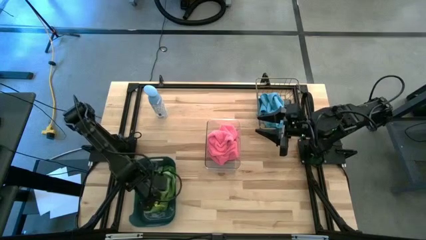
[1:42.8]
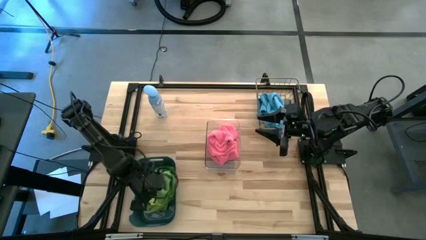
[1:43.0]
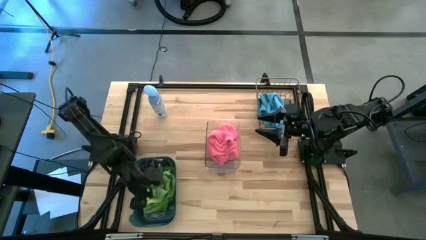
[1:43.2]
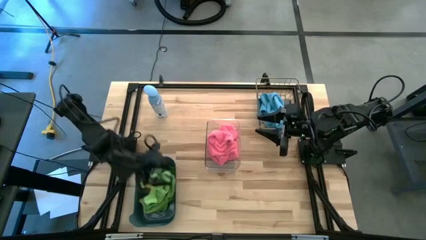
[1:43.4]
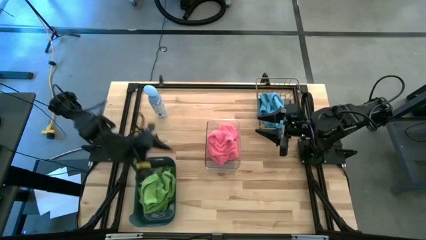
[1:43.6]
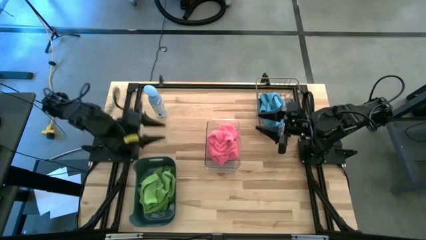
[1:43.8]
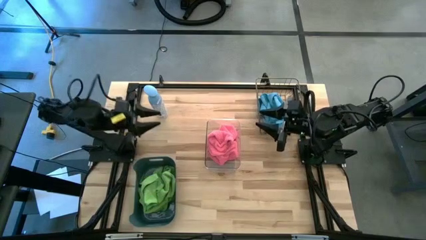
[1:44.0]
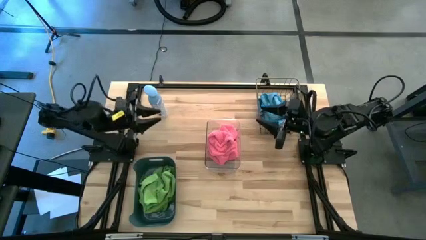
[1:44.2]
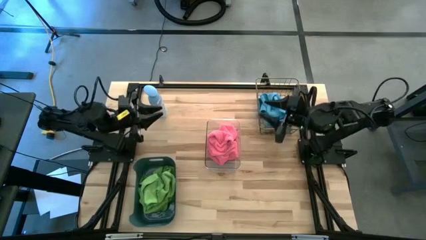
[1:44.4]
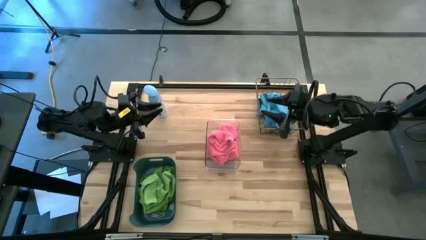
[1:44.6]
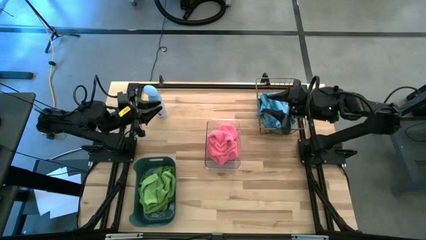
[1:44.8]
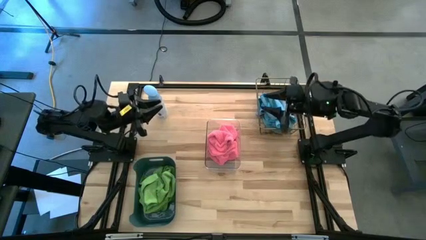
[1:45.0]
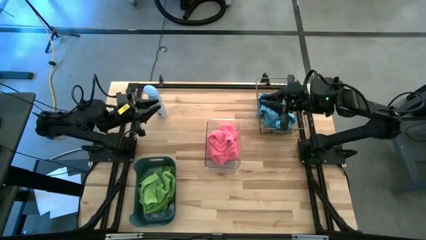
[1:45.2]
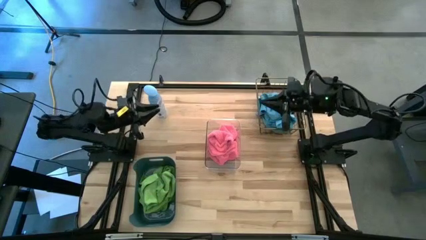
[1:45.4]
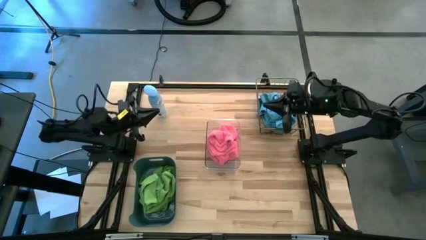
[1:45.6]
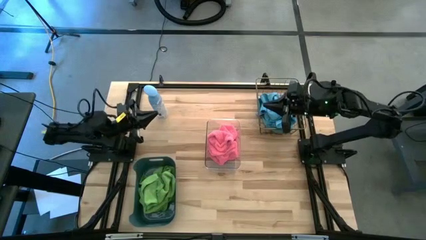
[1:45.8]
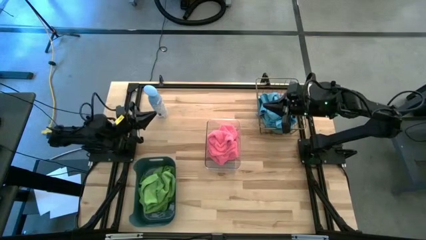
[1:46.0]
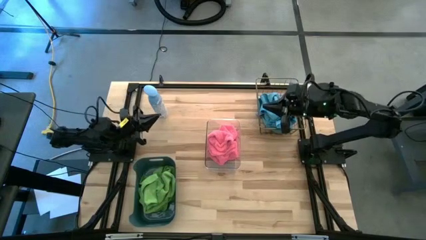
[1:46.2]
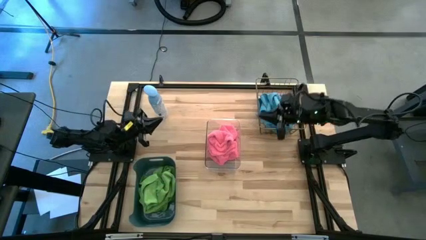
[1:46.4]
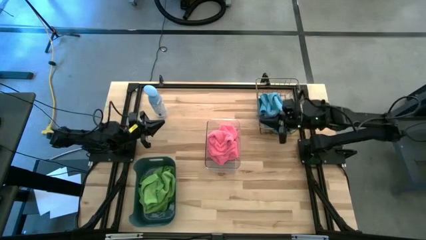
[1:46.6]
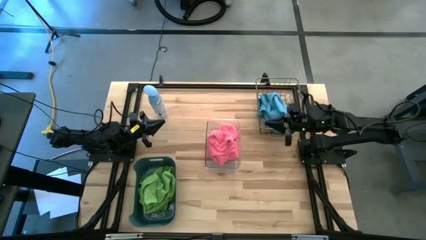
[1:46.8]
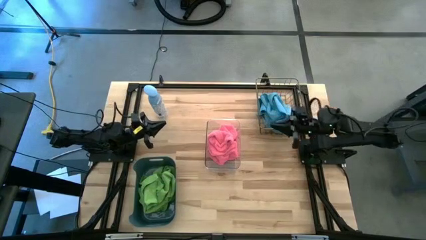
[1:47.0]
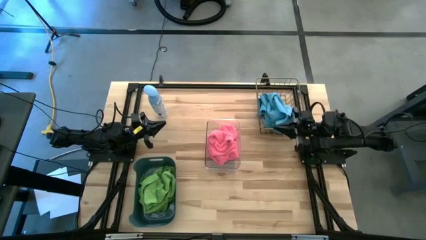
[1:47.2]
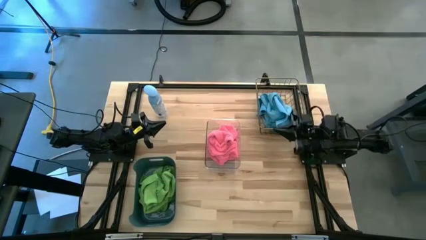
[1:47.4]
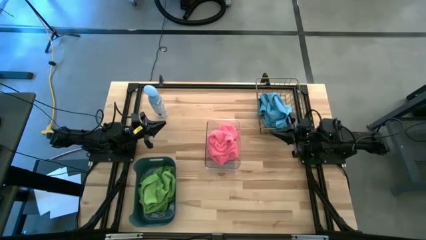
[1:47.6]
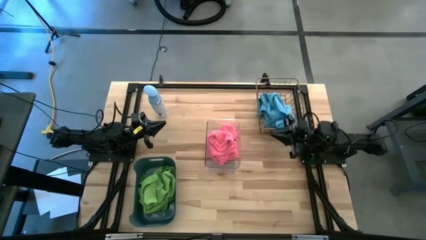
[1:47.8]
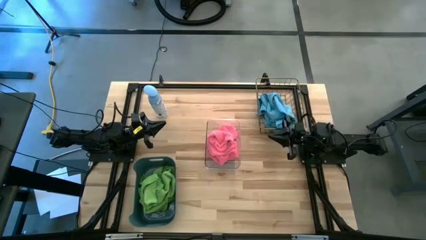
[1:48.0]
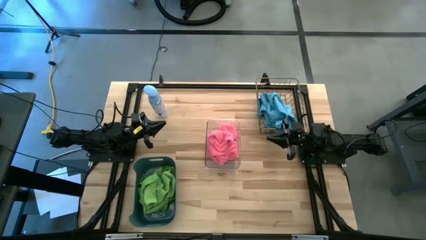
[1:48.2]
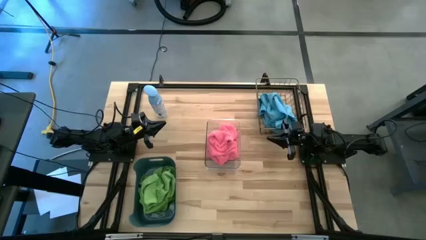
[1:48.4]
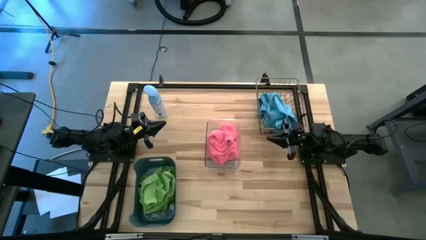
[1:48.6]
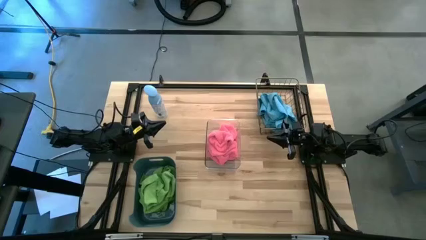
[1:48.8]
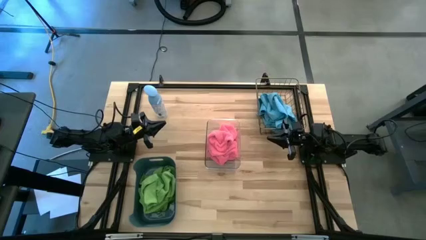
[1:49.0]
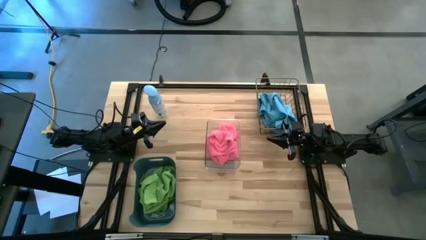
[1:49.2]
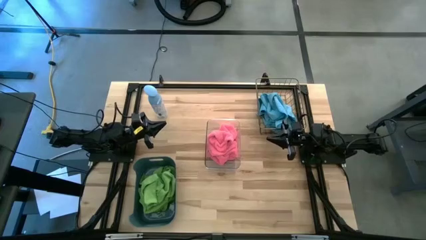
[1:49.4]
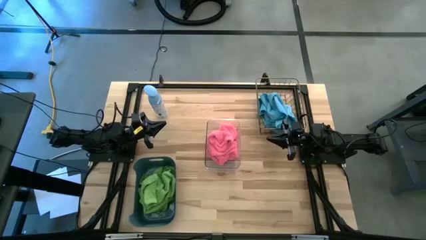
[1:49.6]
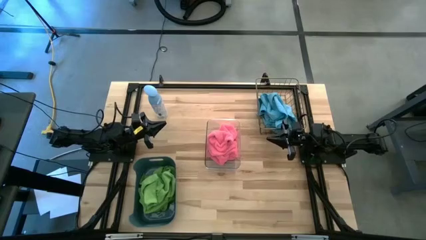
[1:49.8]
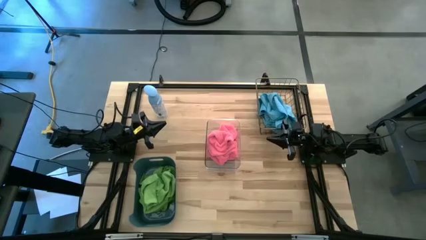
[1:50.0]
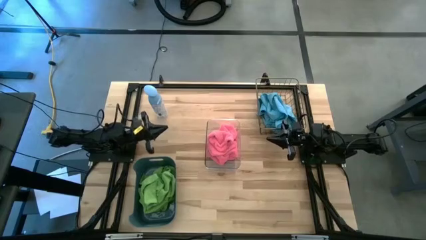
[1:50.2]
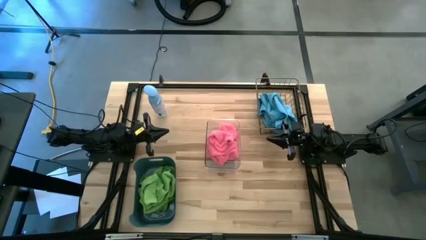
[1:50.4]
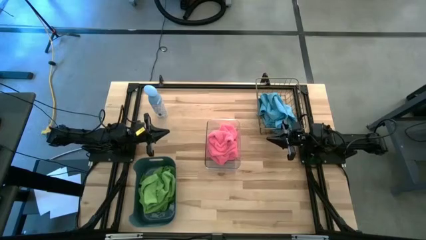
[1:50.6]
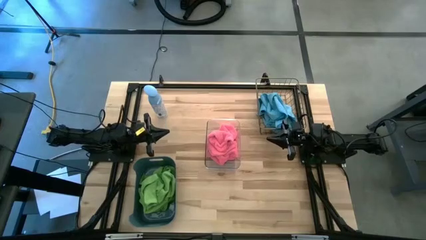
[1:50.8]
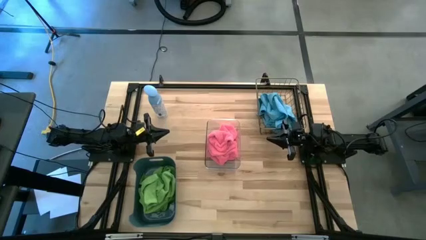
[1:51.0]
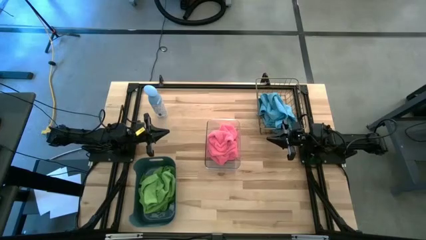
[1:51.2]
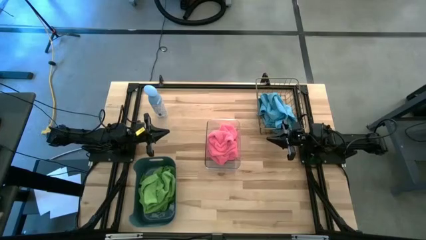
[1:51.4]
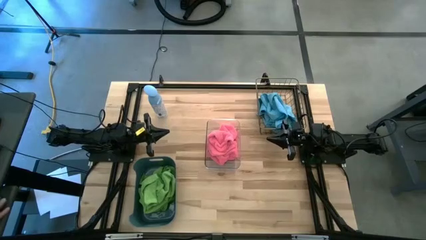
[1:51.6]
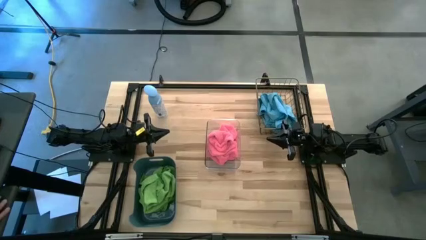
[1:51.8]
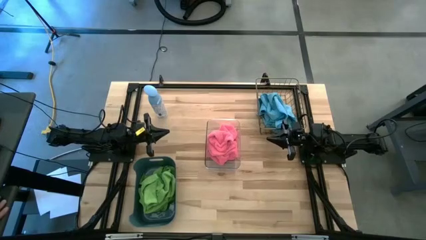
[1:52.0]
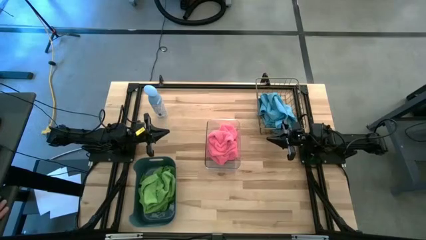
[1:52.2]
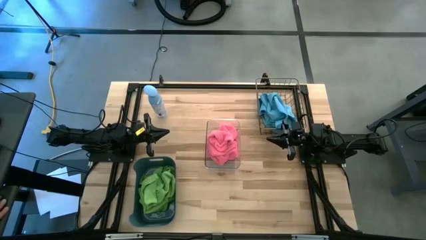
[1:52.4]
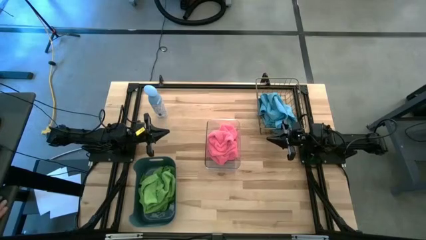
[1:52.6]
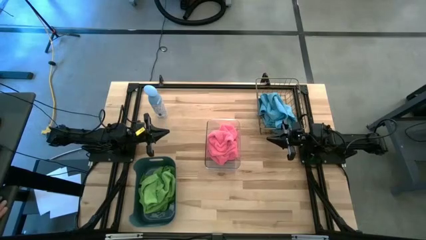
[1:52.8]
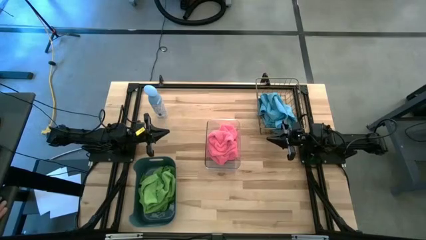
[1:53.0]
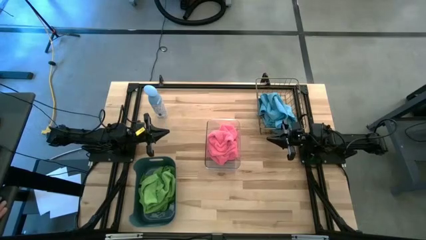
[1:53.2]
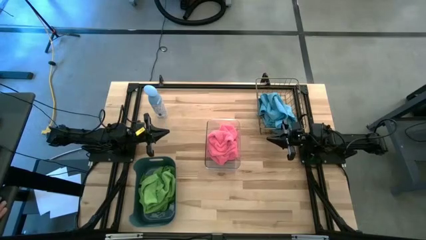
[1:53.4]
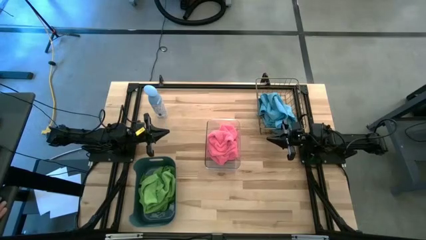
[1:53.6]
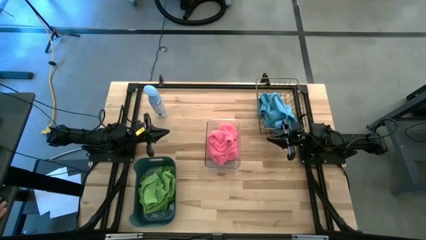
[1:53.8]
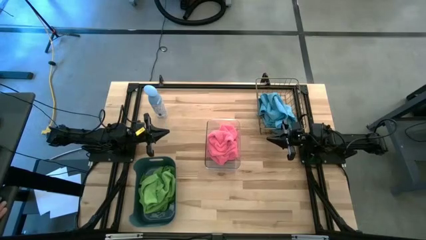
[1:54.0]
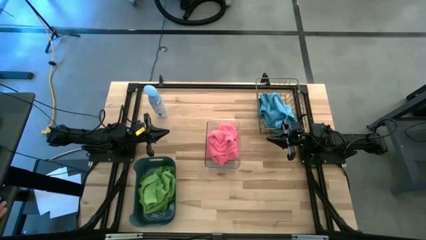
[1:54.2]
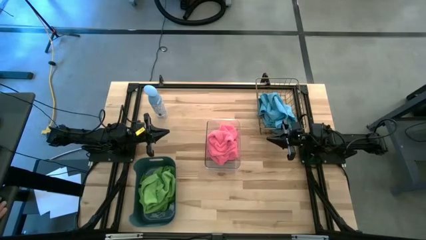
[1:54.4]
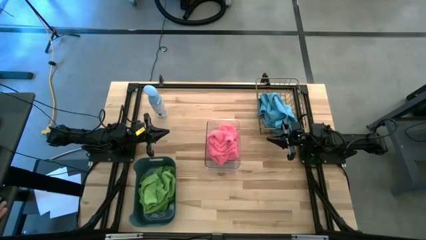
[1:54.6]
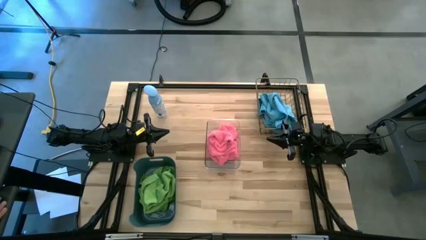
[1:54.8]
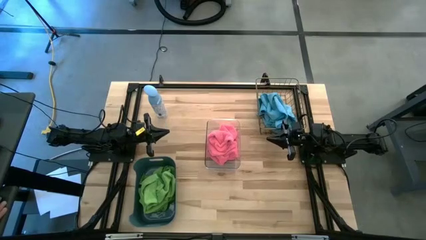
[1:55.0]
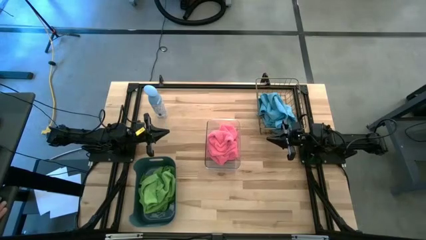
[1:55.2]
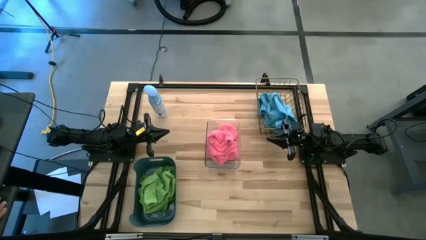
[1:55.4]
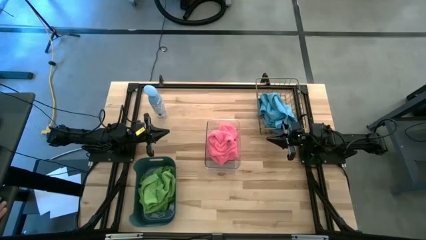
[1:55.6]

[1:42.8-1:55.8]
Task: Sort microfiber towel by color & place in baskets
Return to Home Position
